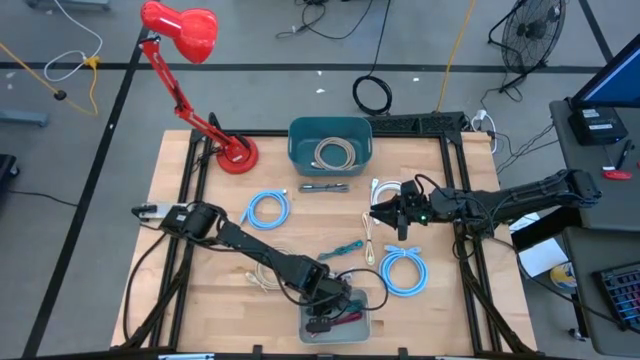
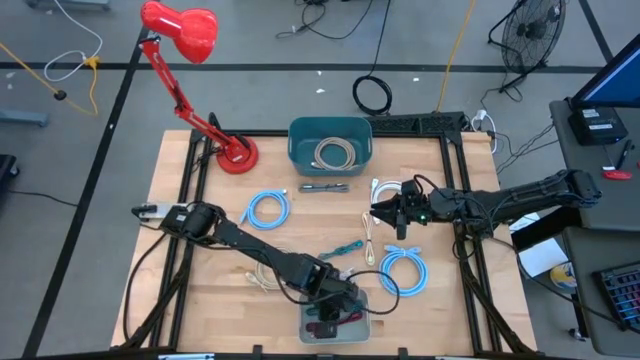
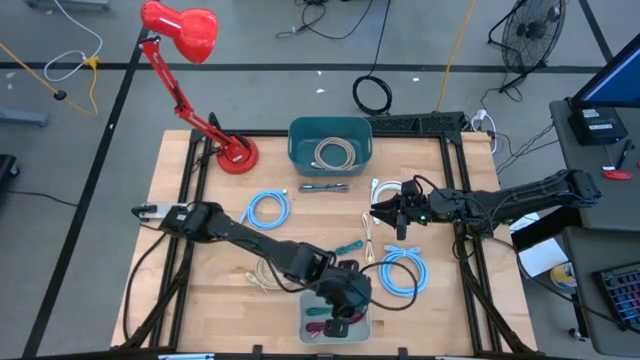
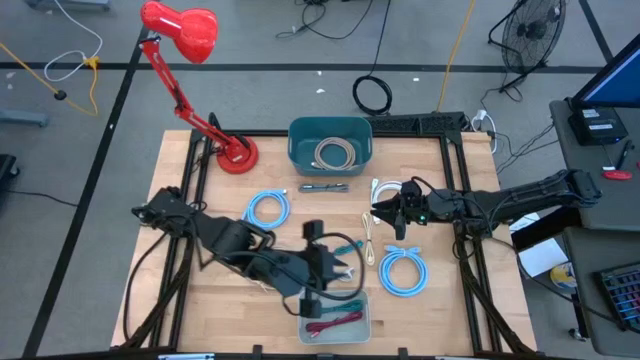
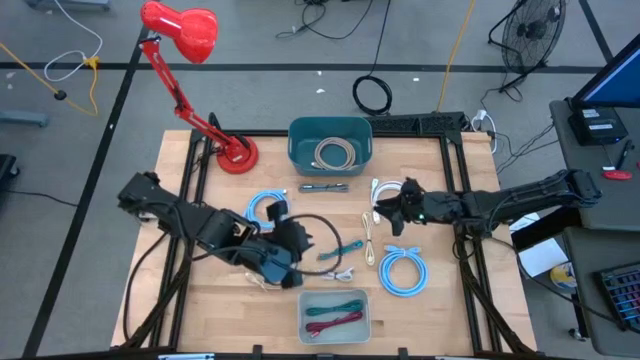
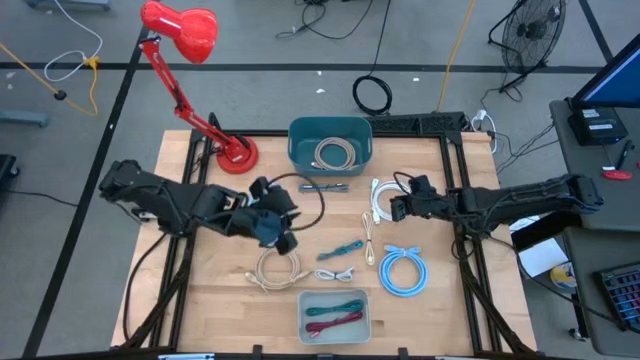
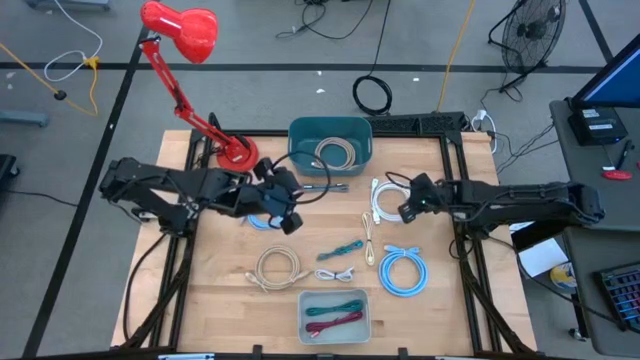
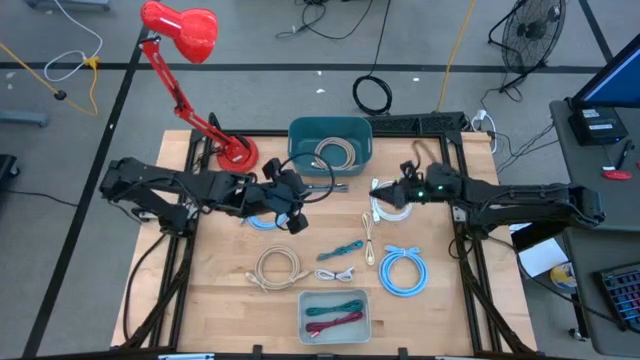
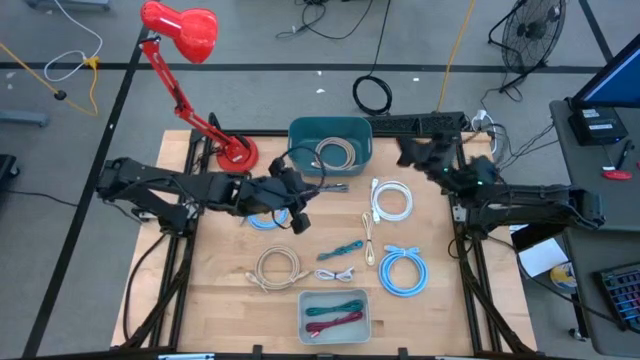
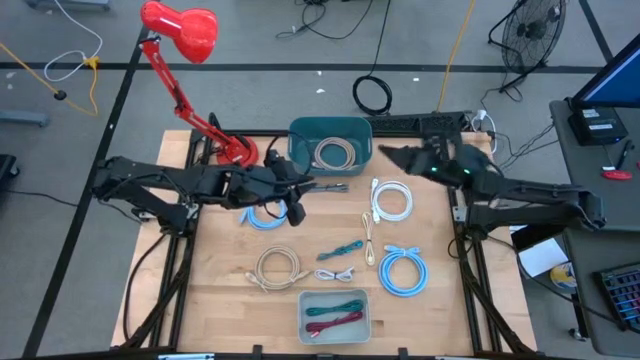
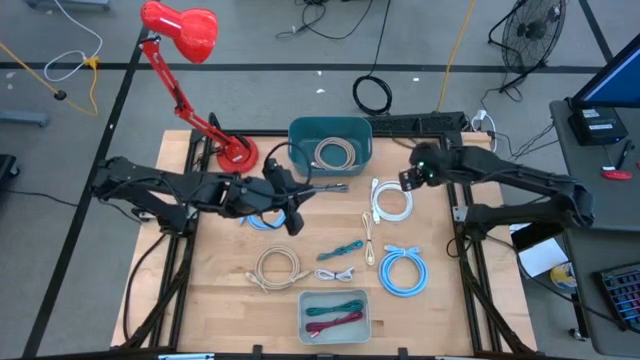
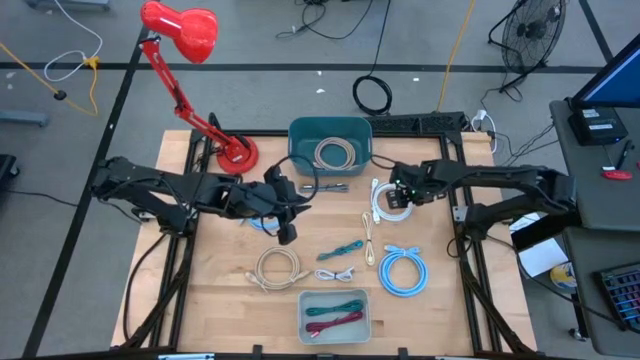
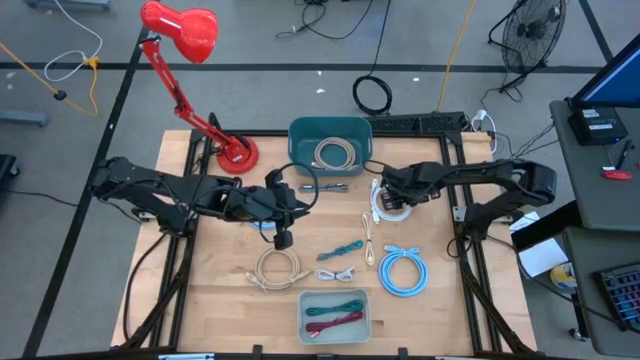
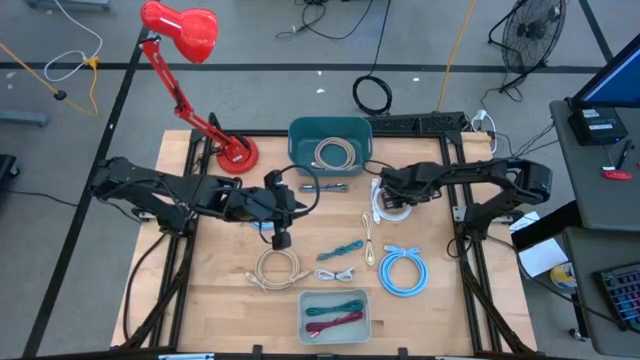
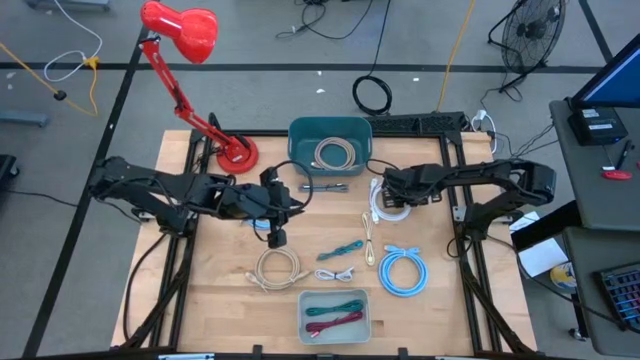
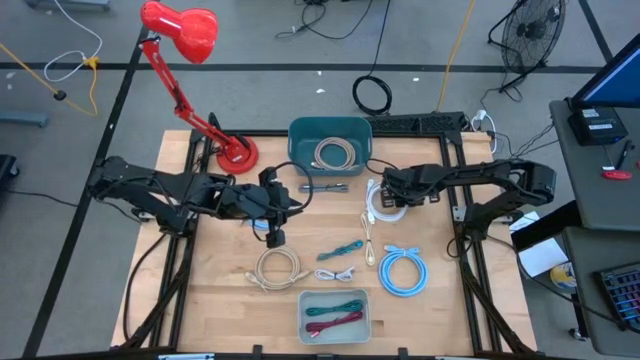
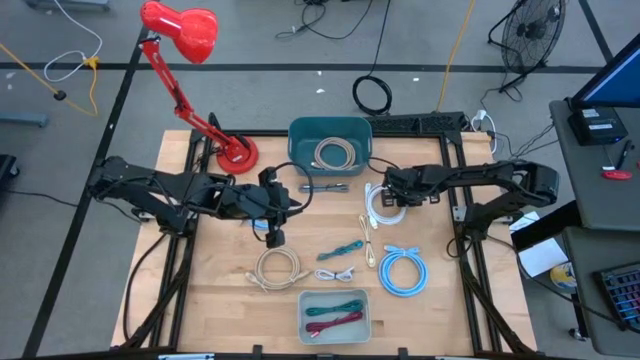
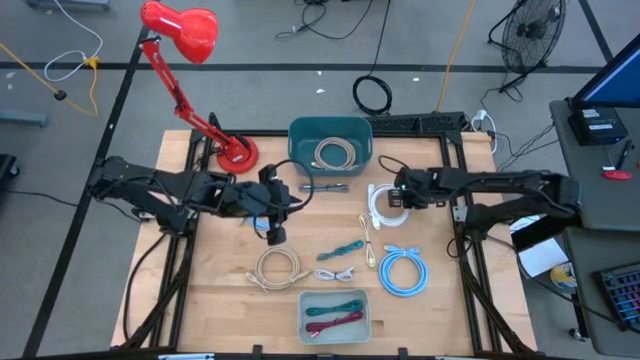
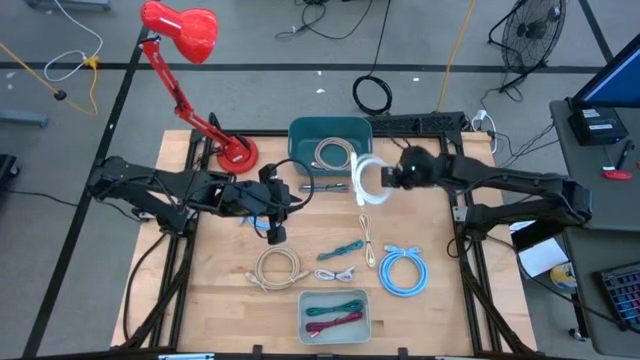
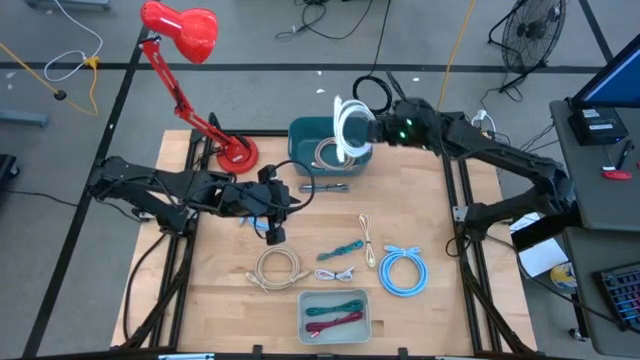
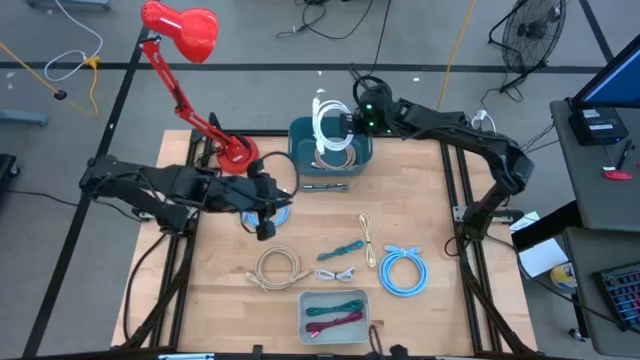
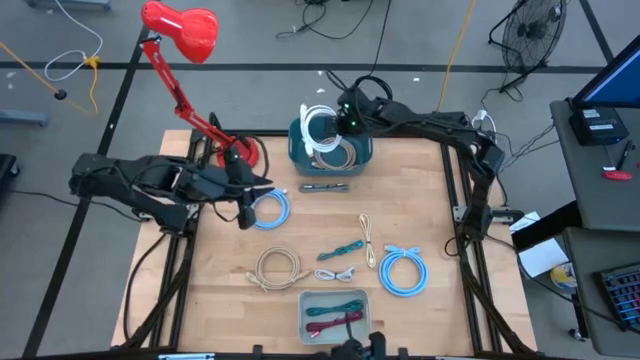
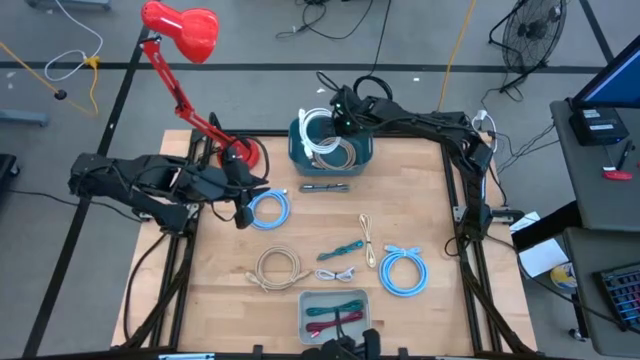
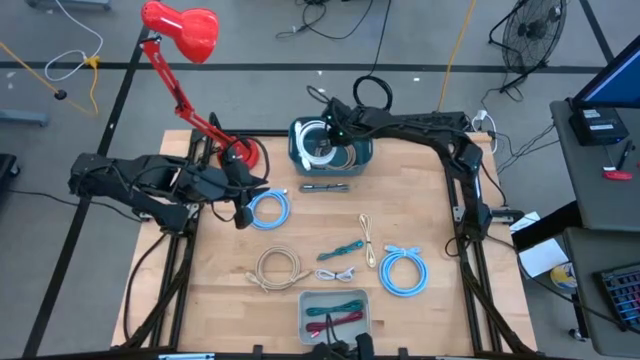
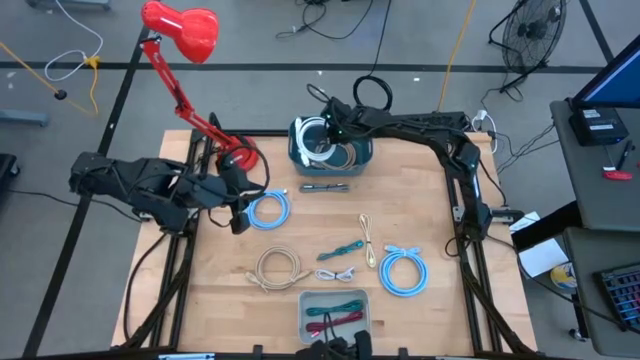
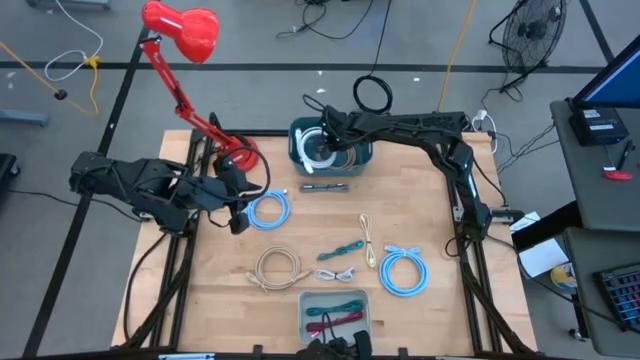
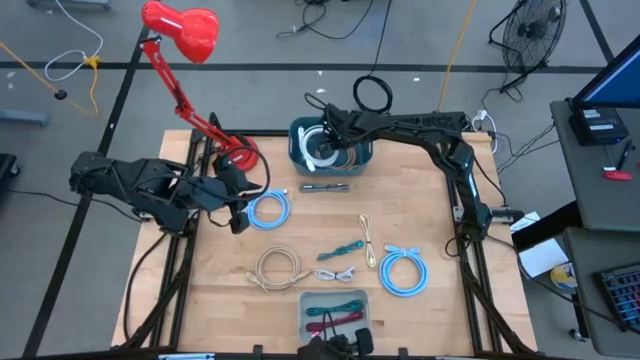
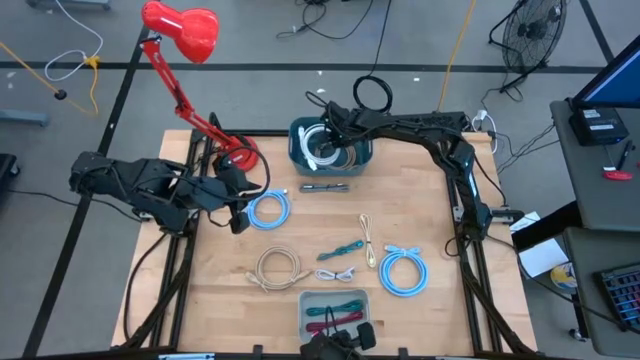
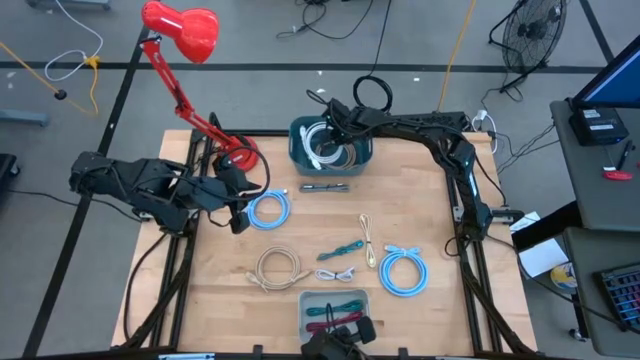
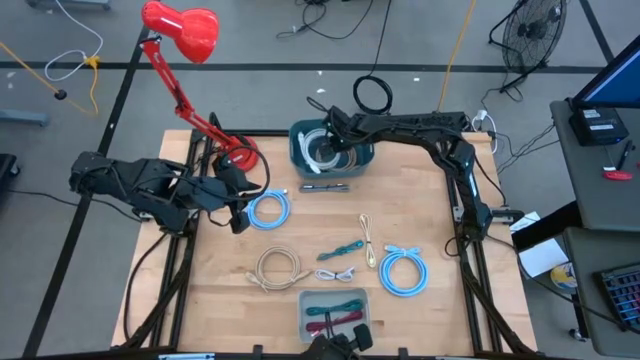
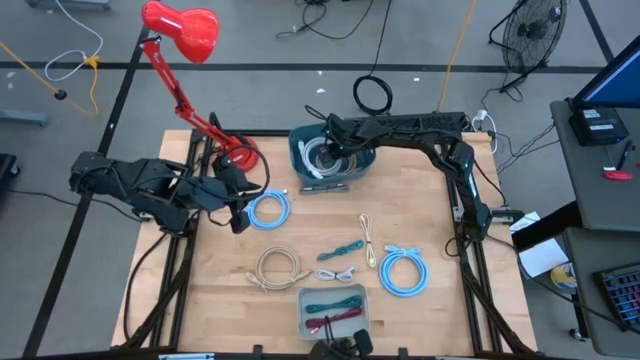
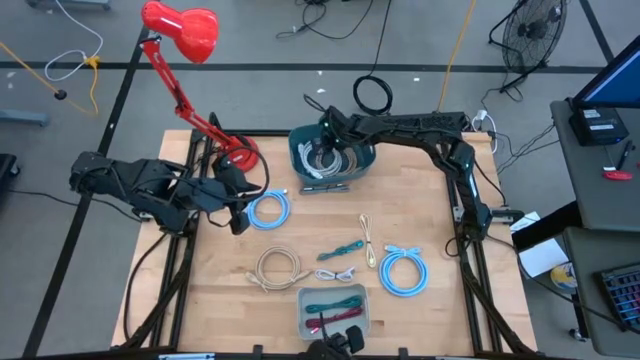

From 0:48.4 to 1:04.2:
Task: Pick & Place USB Port
Put the white hdmi cable into the green bin

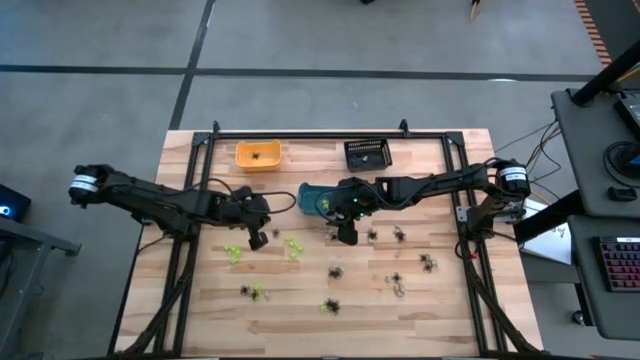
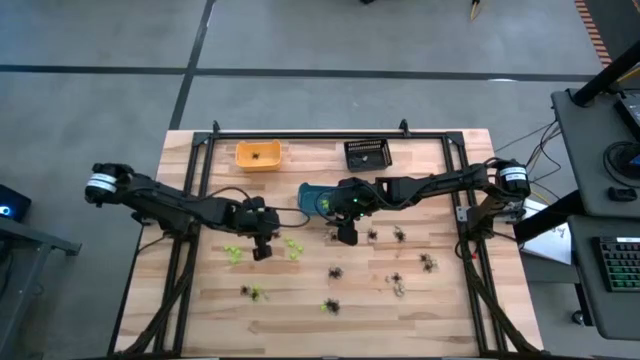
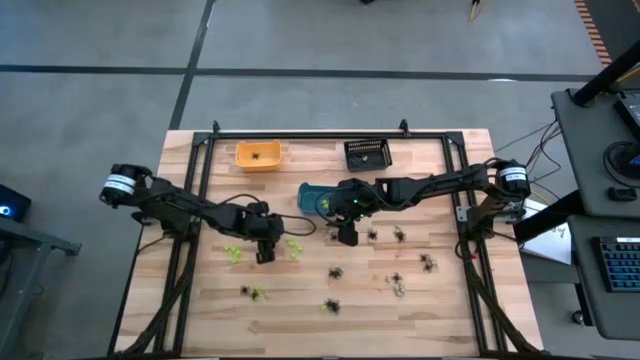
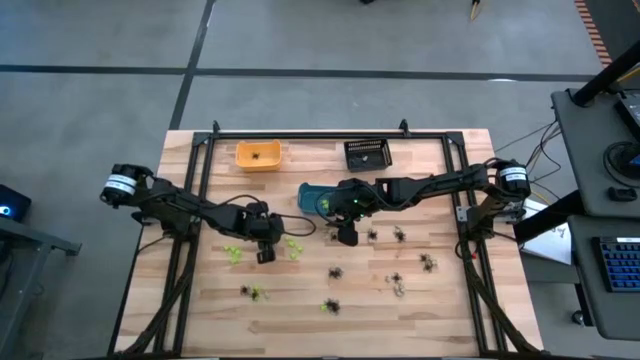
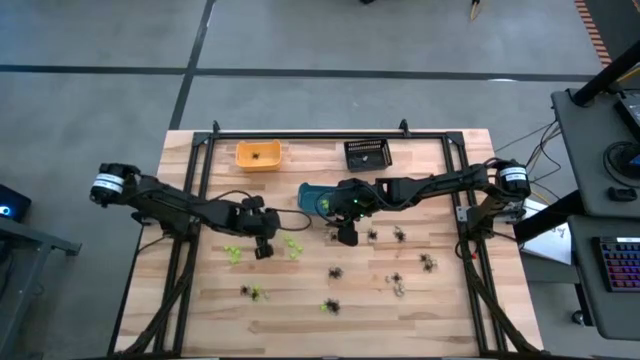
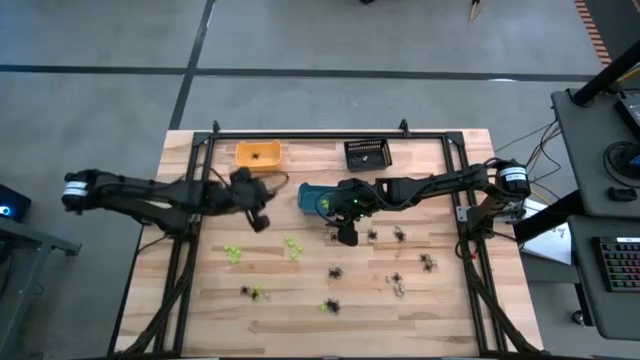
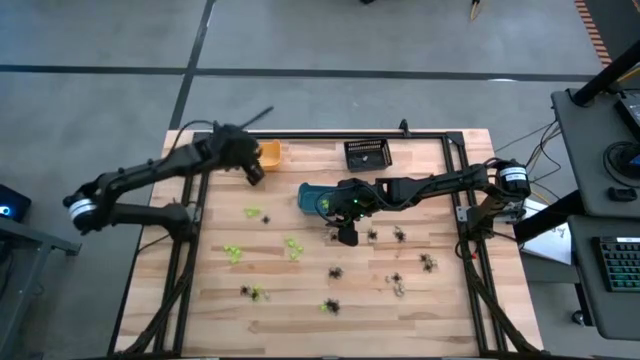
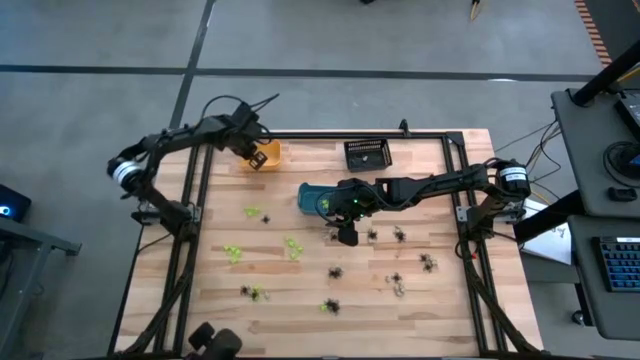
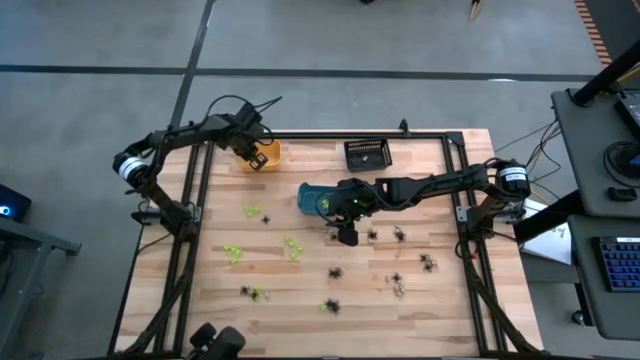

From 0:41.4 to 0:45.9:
Task: Sort Halloween decoration
Put the black spider toy into the yellow bin
